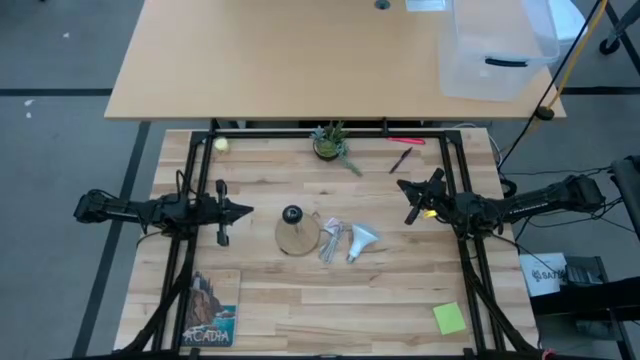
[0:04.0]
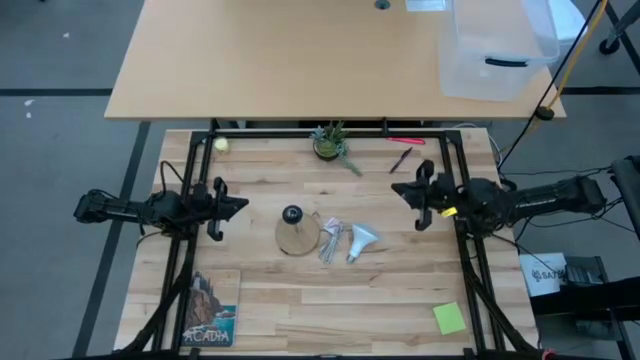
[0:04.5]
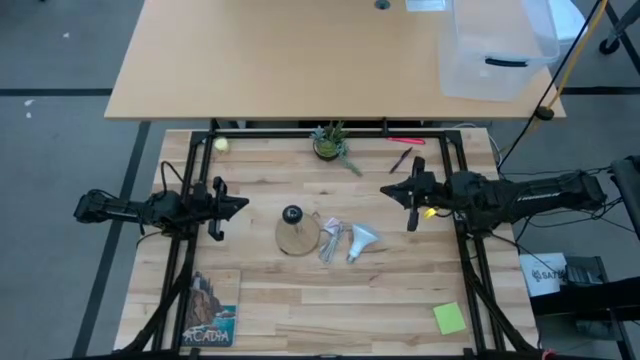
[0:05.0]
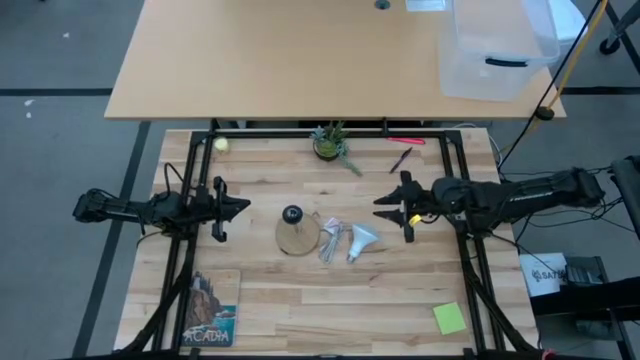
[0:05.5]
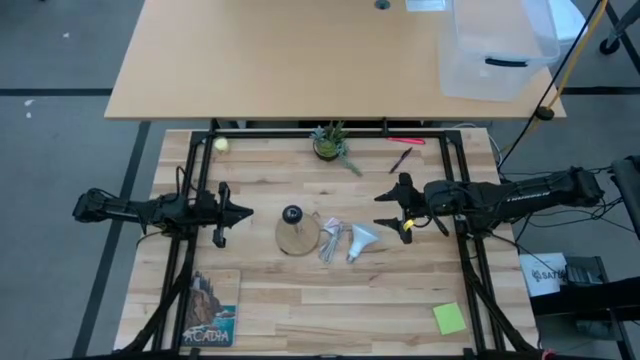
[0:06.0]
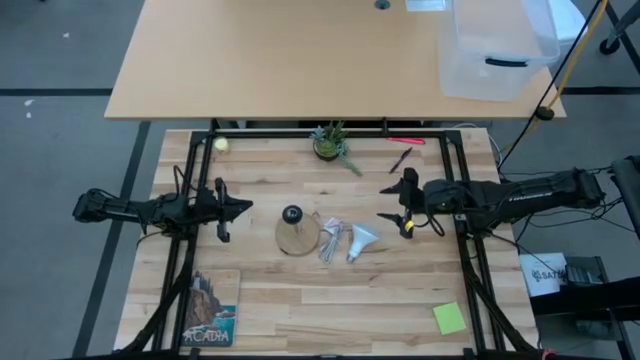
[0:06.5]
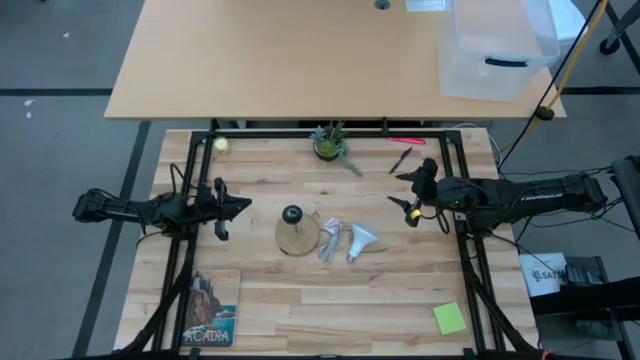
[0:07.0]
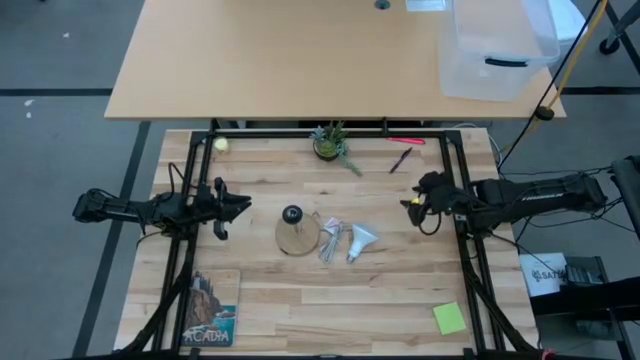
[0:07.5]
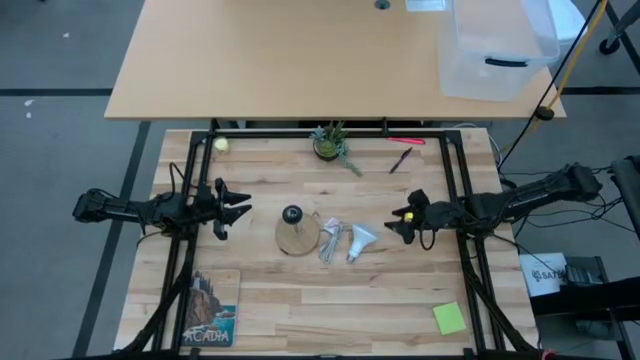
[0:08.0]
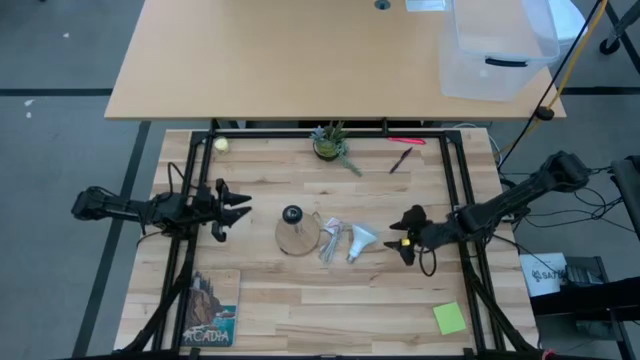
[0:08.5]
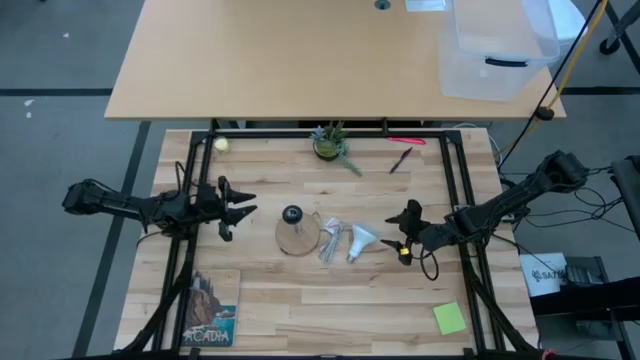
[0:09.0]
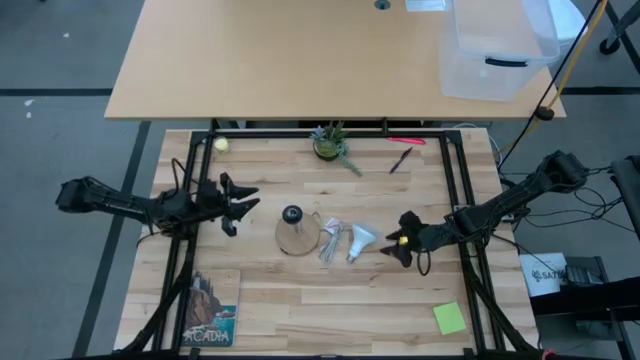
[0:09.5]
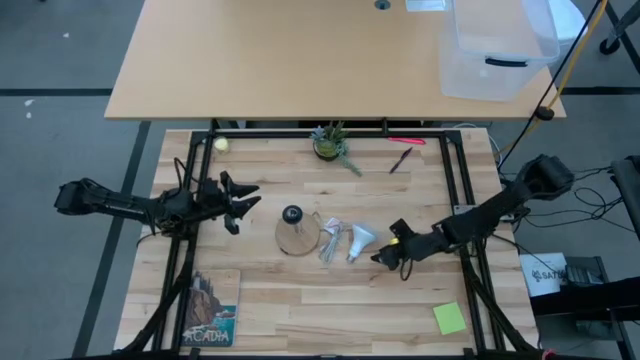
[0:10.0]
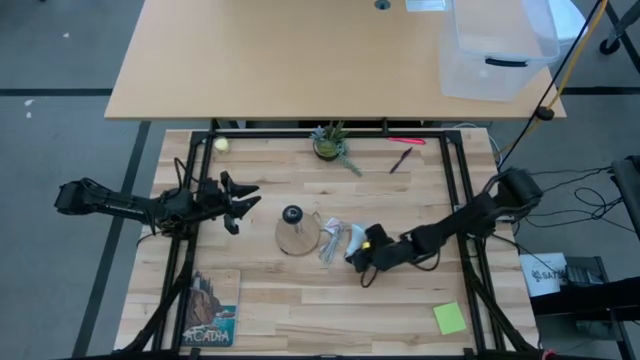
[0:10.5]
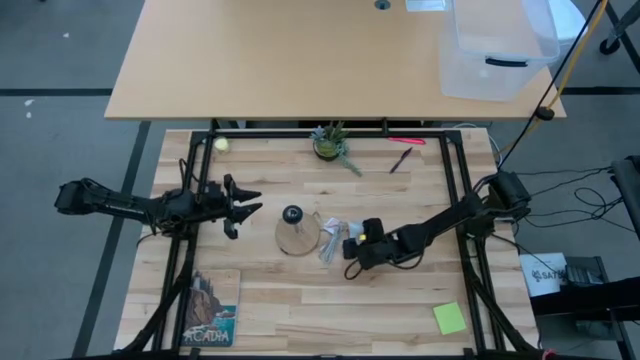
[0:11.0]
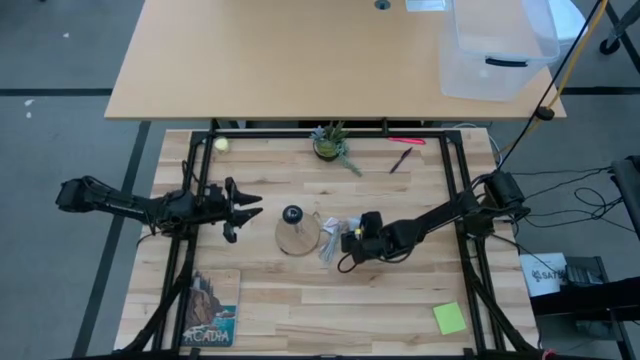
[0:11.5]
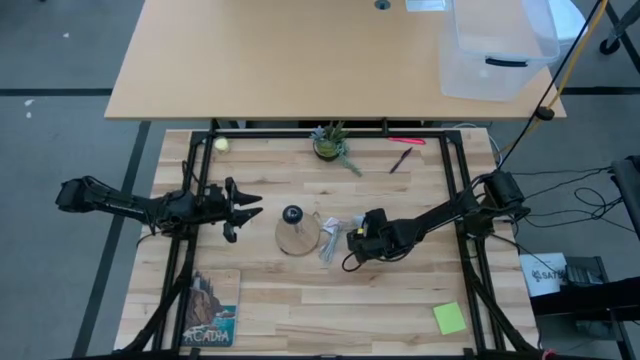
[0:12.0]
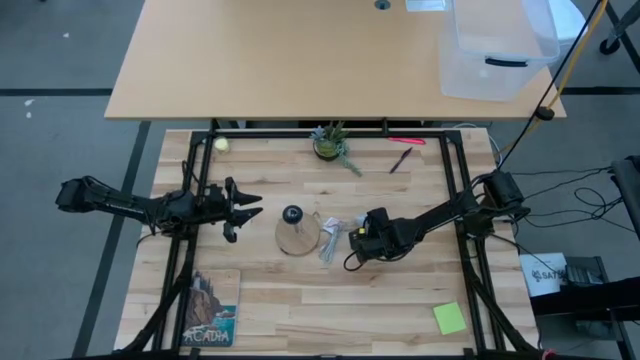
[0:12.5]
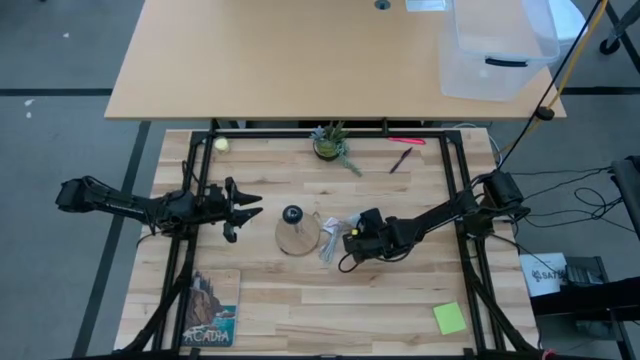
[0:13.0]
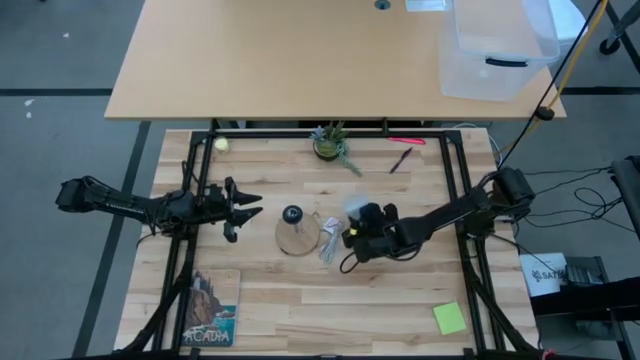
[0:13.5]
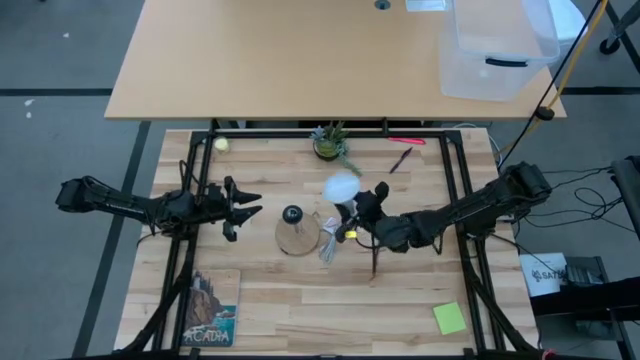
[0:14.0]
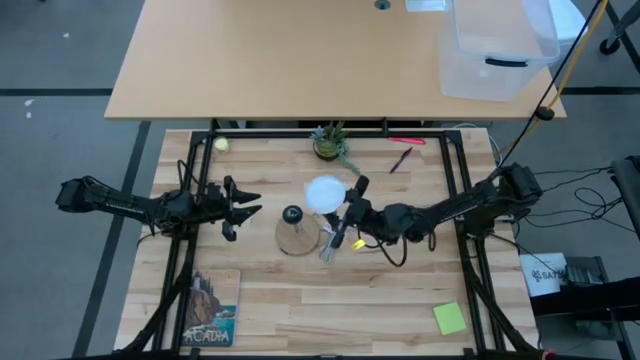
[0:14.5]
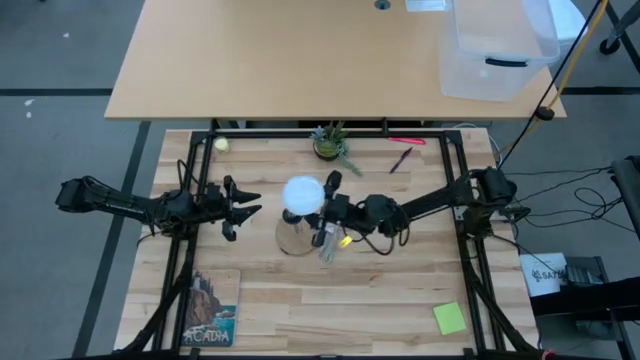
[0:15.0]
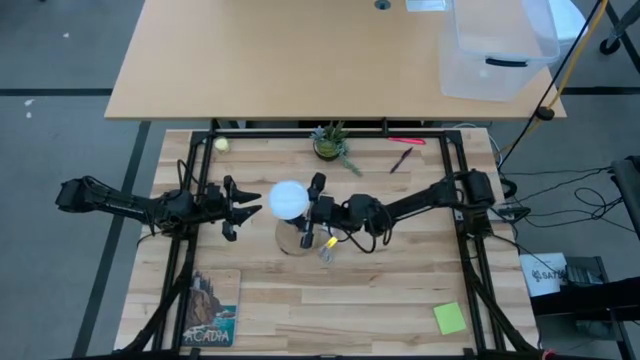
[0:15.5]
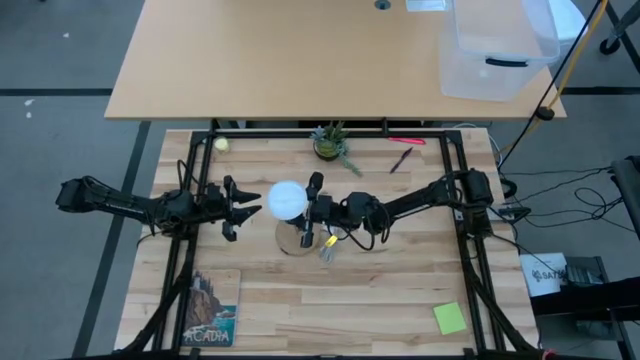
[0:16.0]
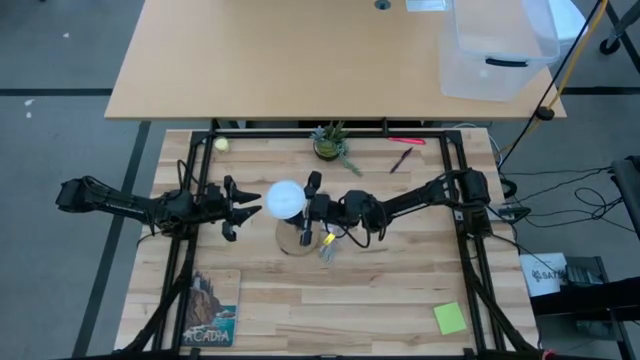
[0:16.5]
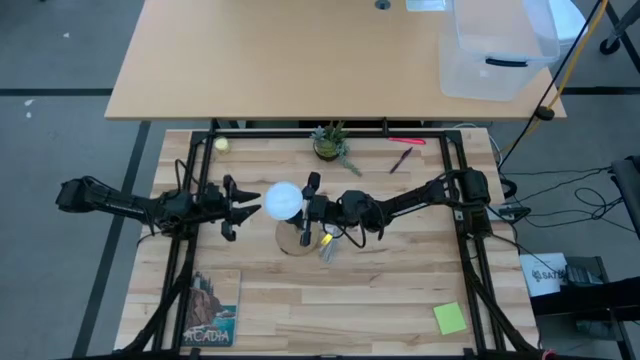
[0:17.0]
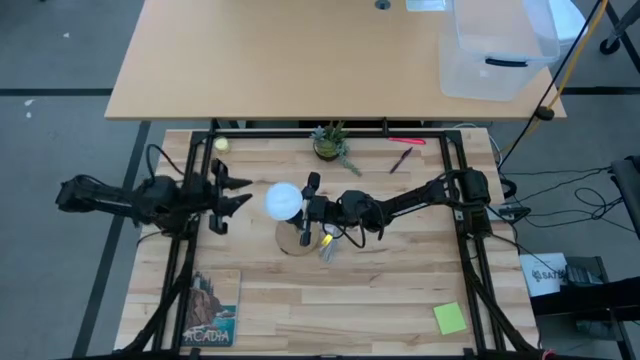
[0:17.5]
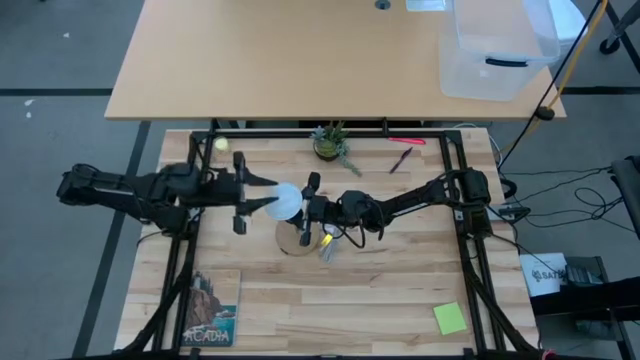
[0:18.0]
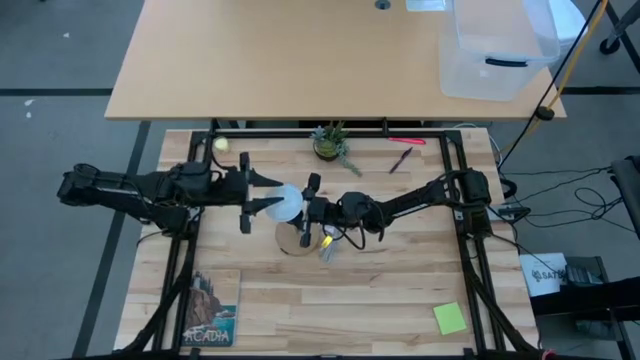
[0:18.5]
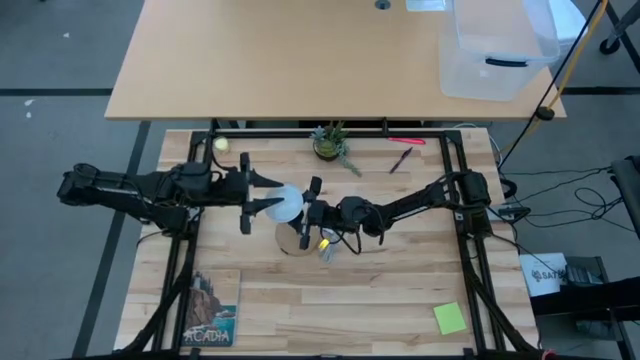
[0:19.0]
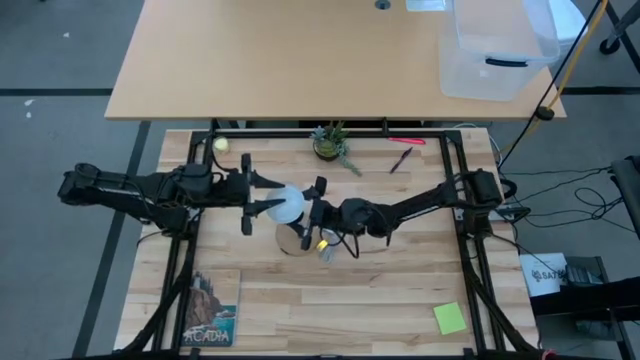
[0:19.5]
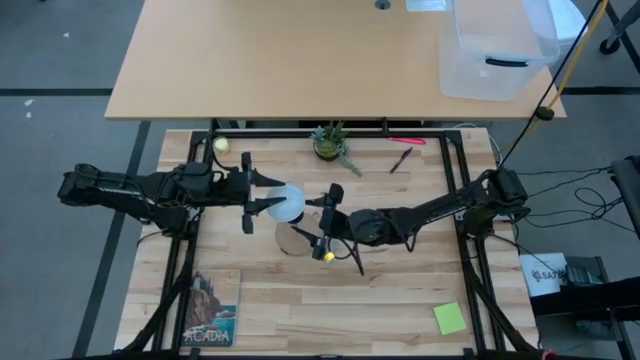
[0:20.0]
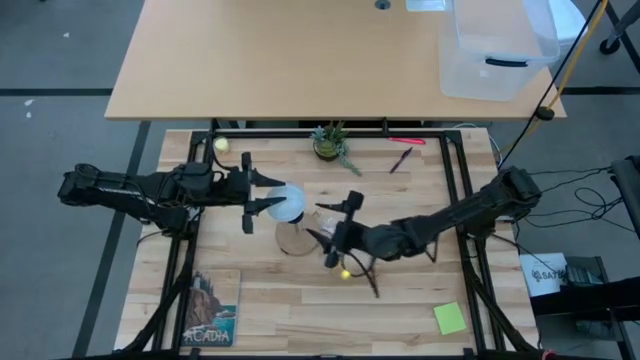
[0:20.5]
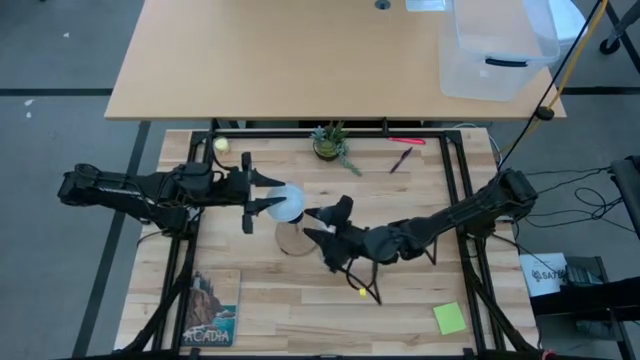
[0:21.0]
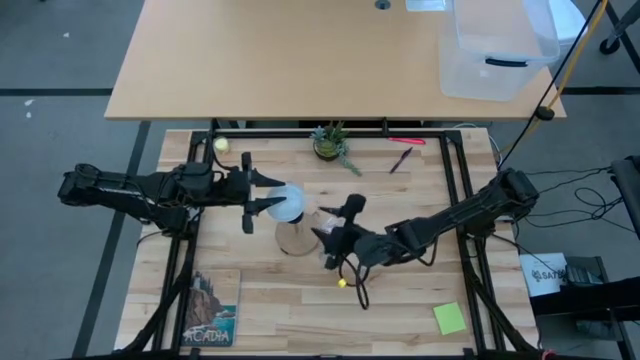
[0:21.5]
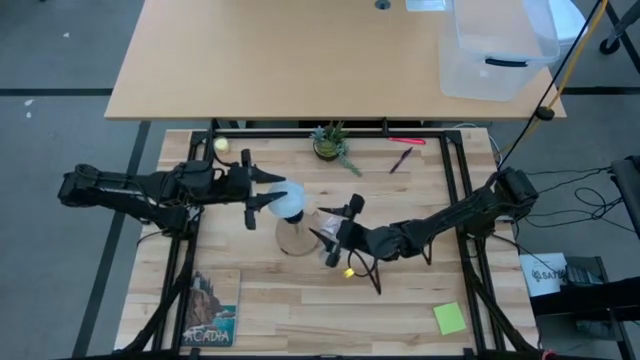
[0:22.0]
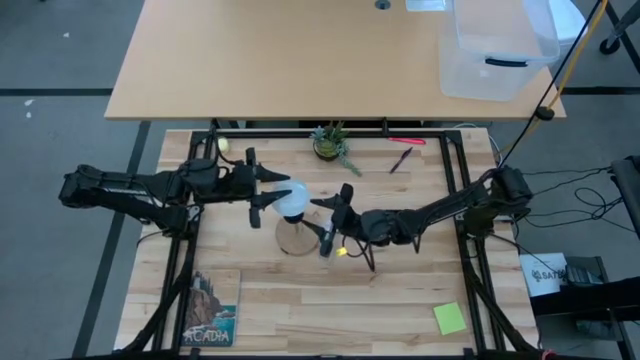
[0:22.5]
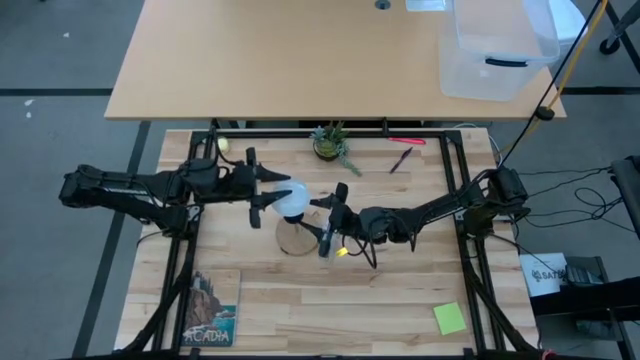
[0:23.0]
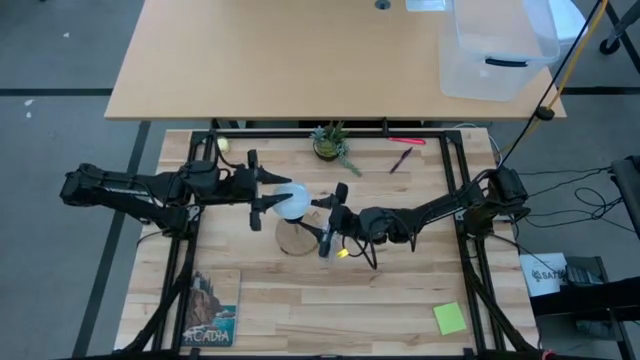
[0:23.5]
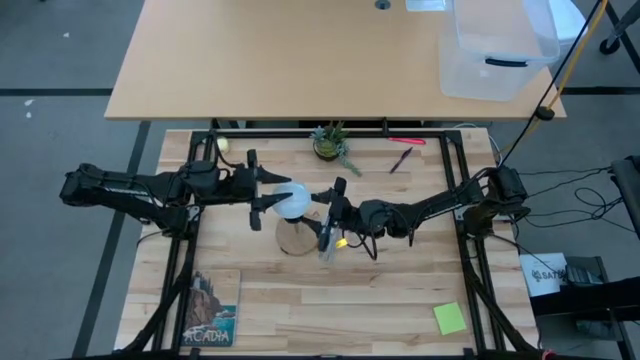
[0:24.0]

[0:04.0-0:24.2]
Task: Screw lightbulb
Insert the lightbulb into the lamp
